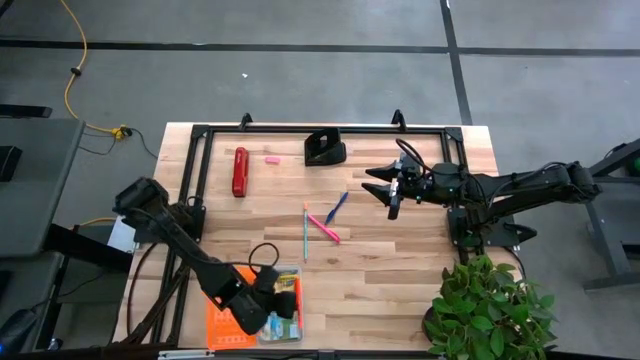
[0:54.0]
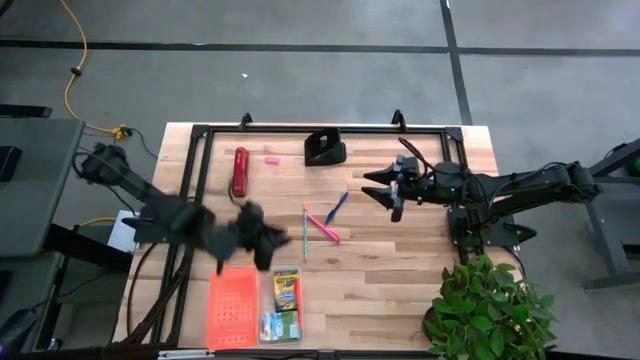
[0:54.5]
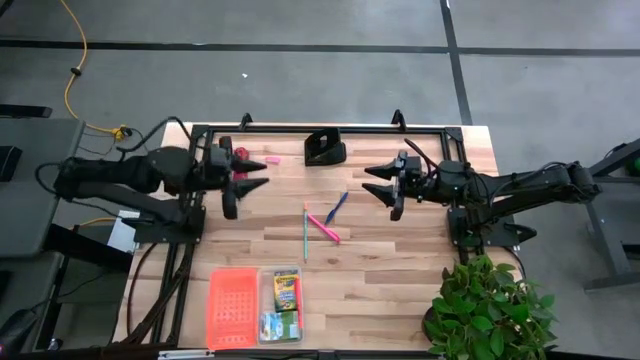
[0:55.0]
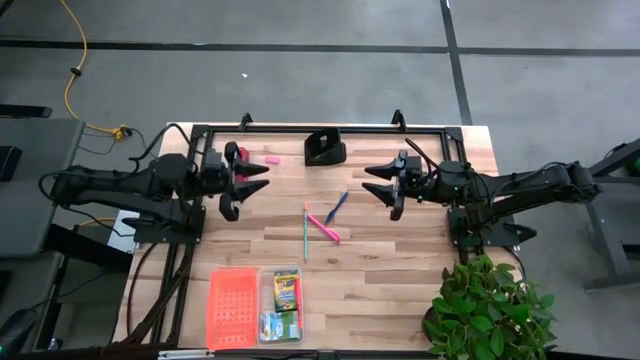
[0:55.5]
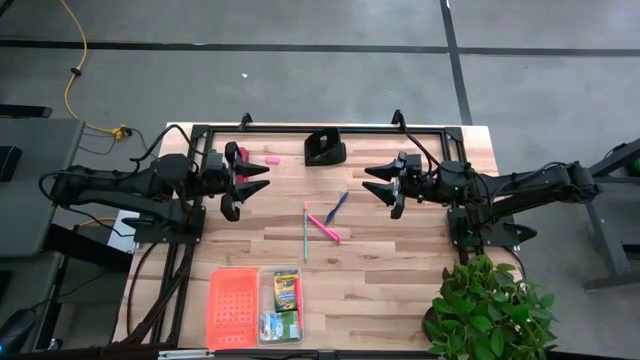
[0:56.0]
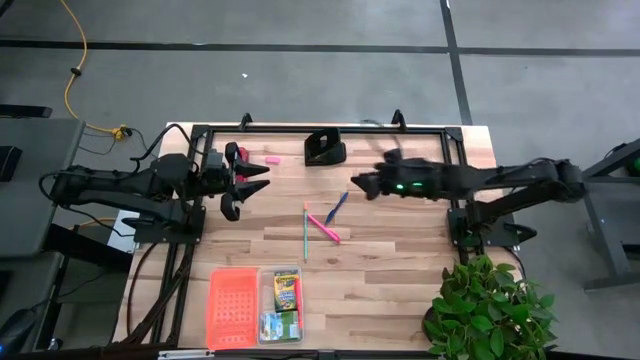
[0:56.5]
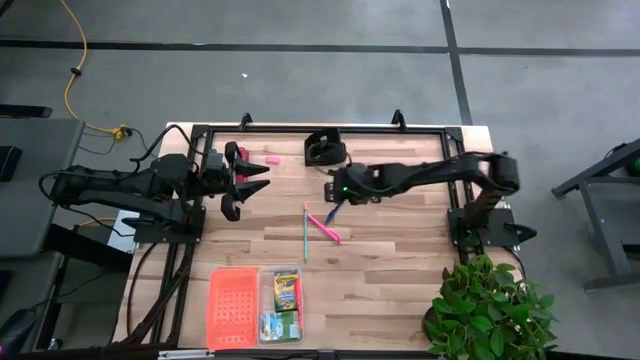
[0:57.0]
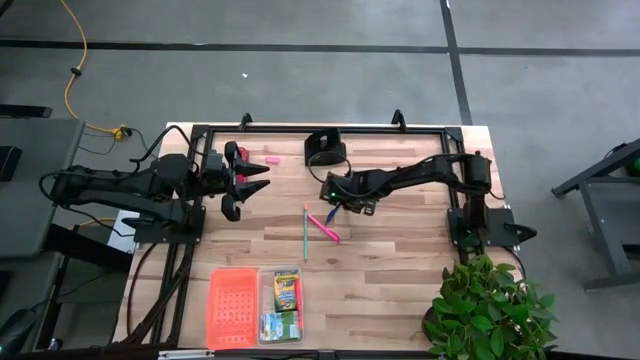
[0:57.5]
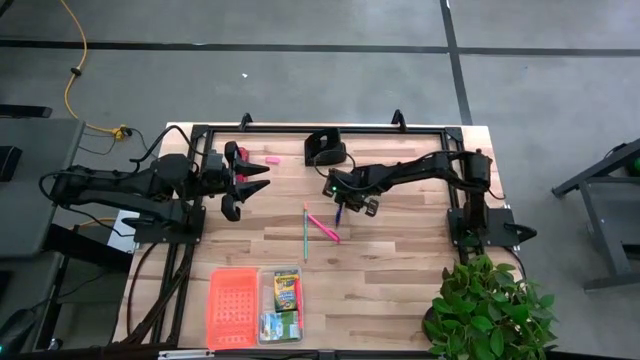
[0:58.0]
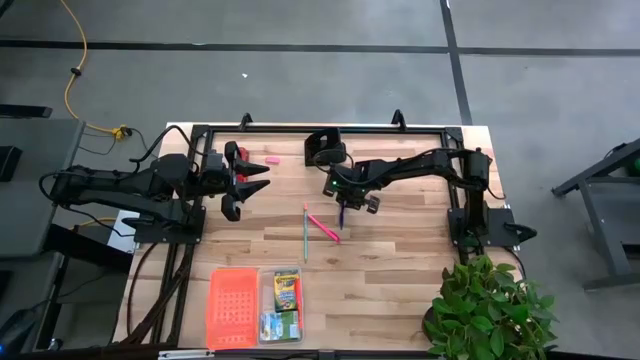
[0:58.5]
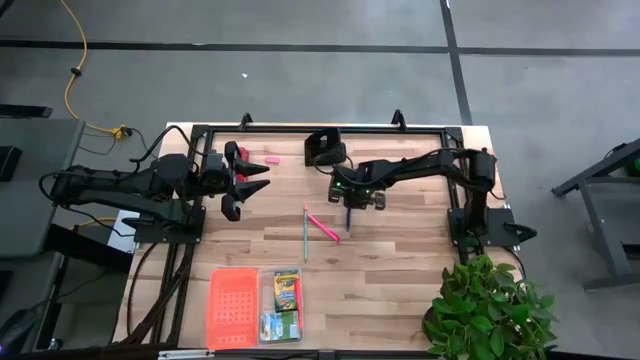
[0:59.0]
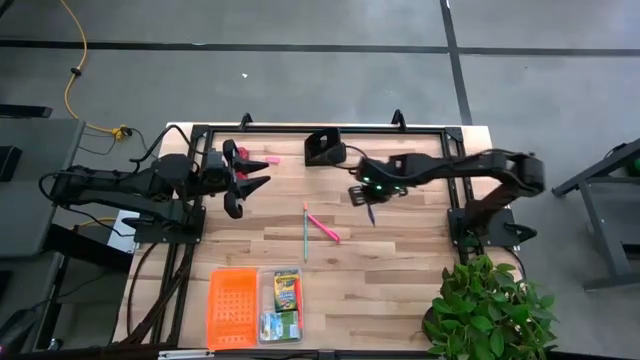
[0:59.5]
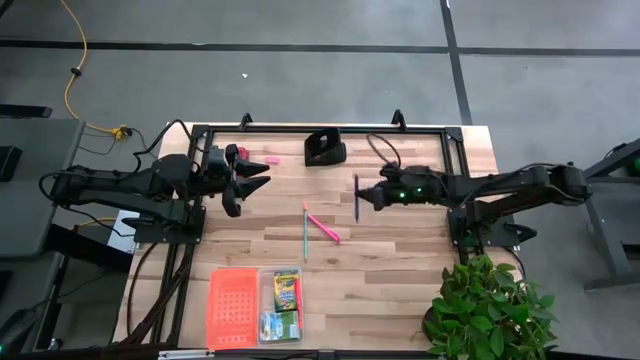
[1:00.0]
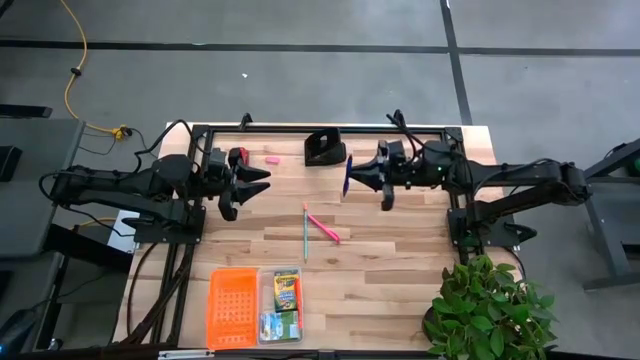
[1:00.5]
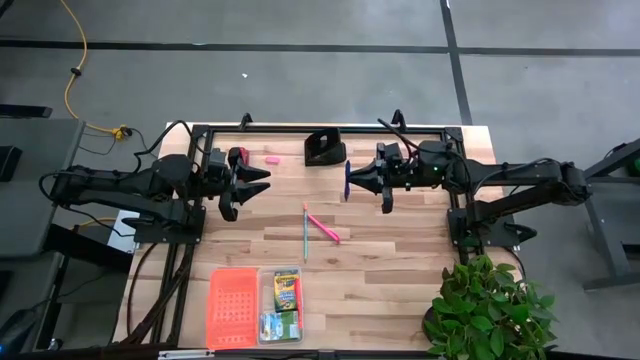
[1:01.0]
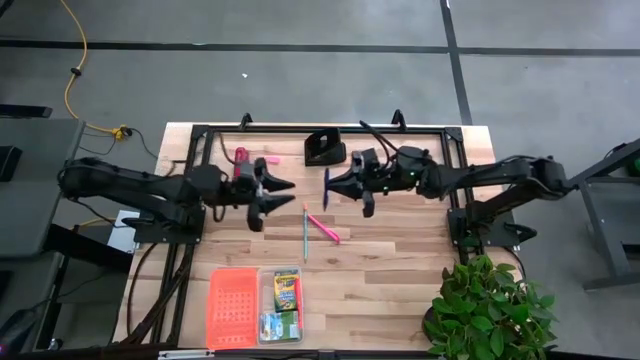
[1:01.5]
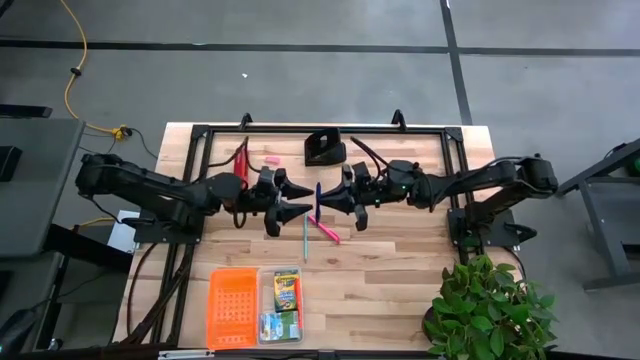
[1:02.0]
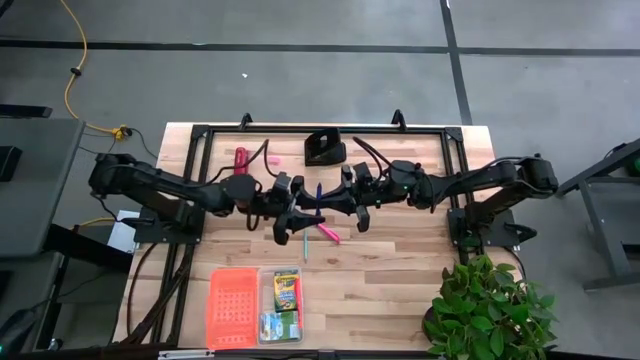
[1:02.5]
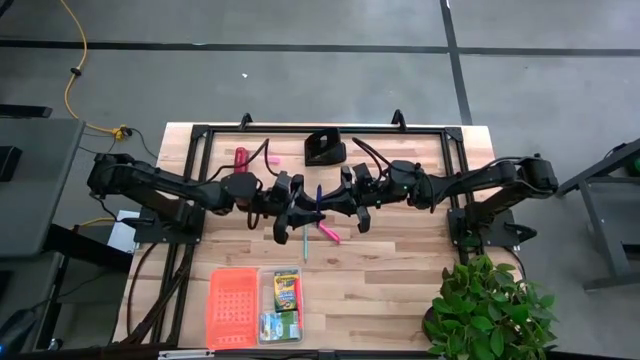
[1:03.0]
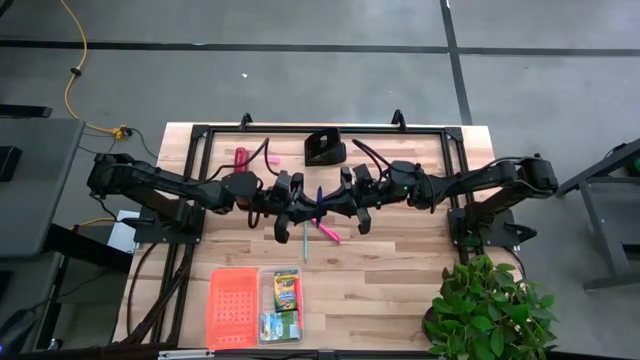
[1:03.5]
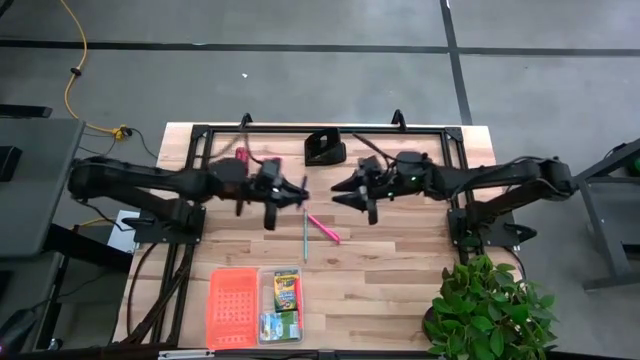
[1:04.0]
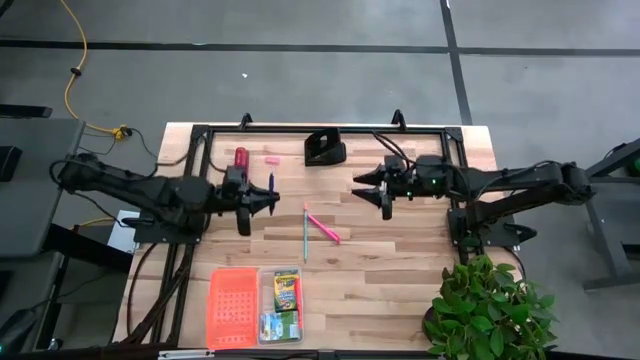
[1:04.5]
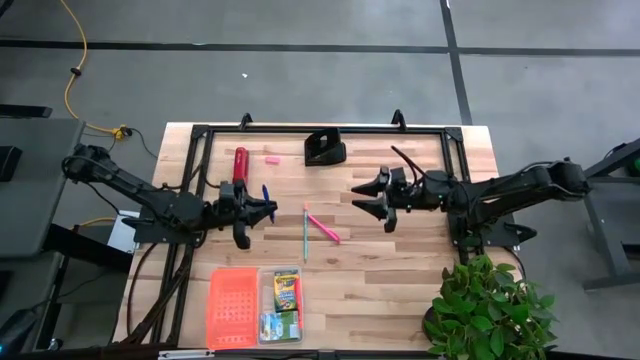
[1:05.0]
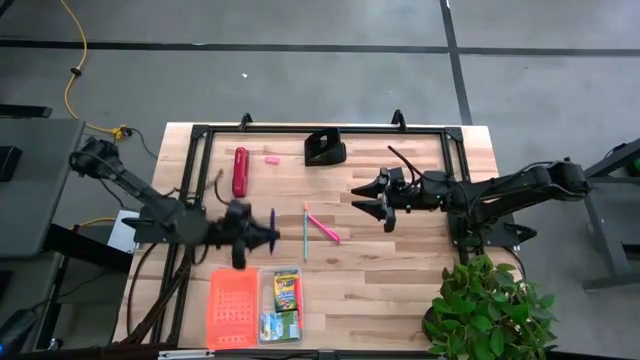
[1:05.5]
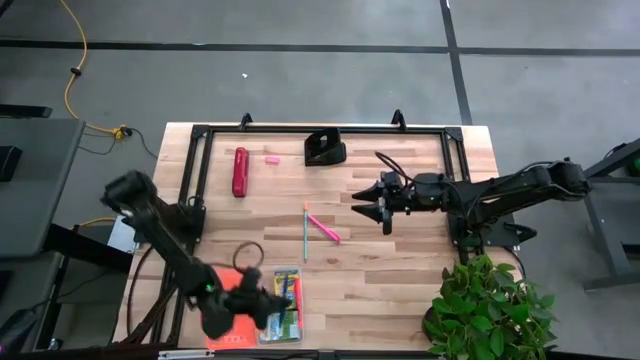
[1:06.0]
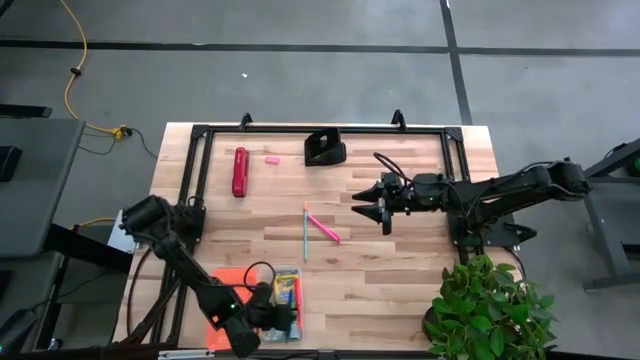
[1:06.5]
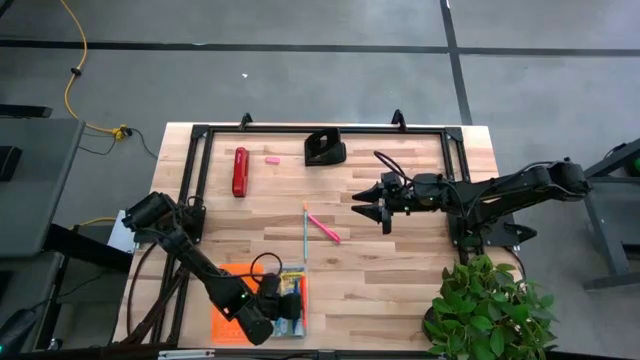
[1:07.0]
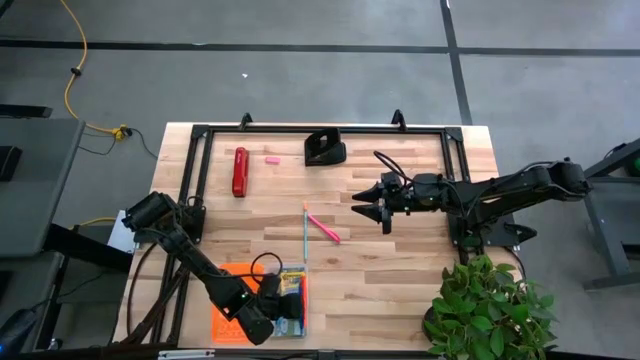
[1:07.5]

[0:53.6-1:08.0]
Task: Pack school essentials
Put the blue pen into the supply box

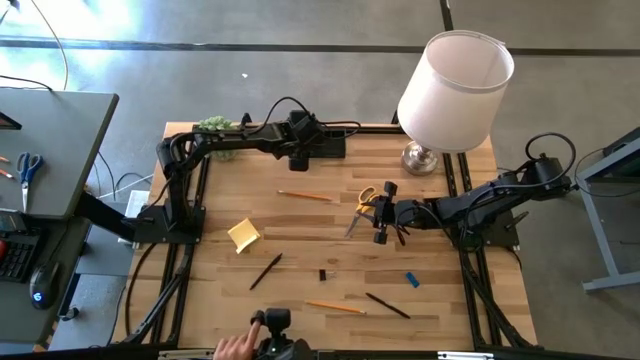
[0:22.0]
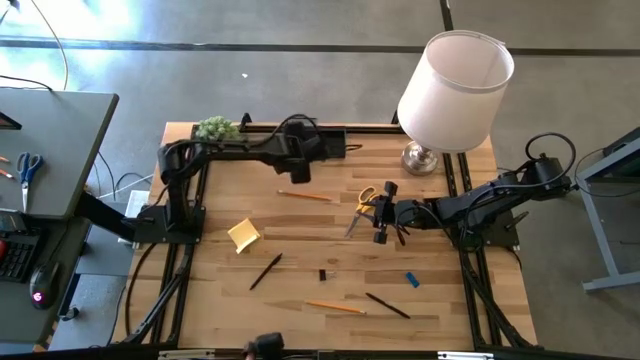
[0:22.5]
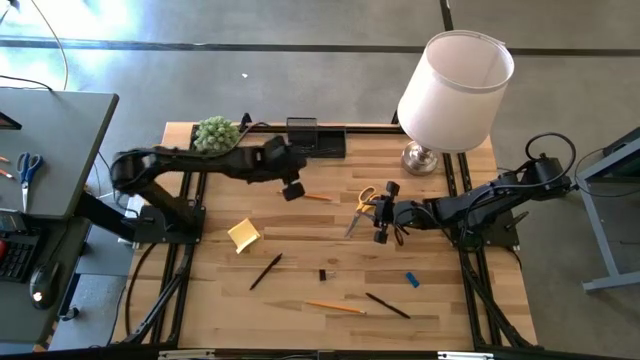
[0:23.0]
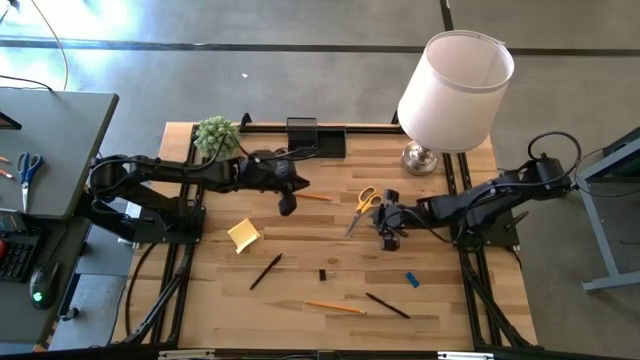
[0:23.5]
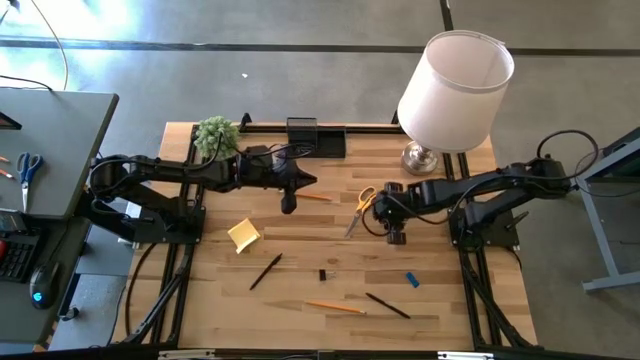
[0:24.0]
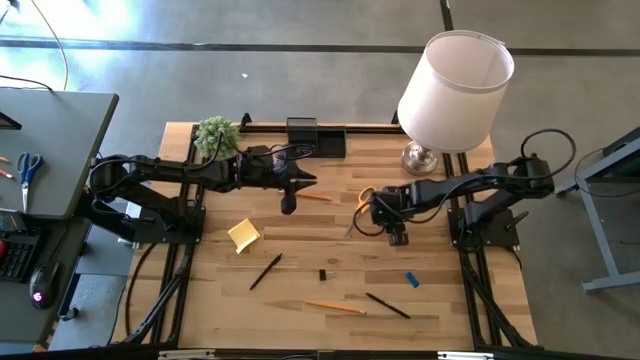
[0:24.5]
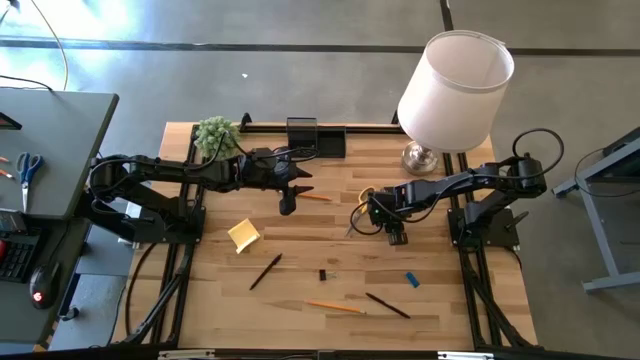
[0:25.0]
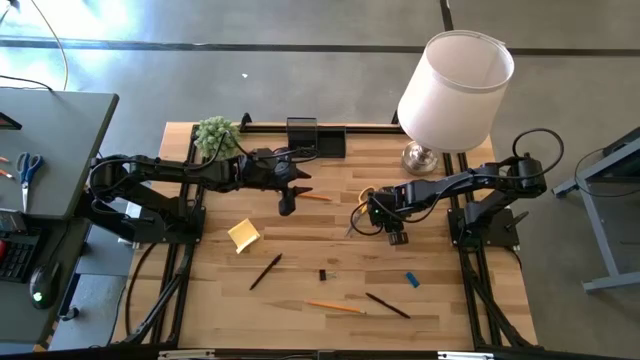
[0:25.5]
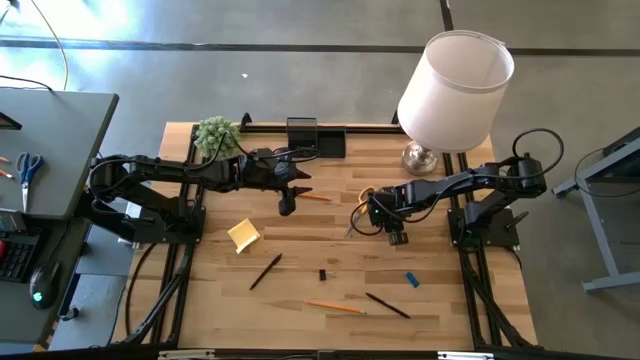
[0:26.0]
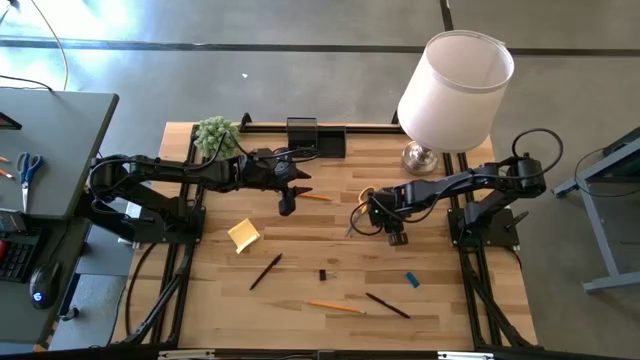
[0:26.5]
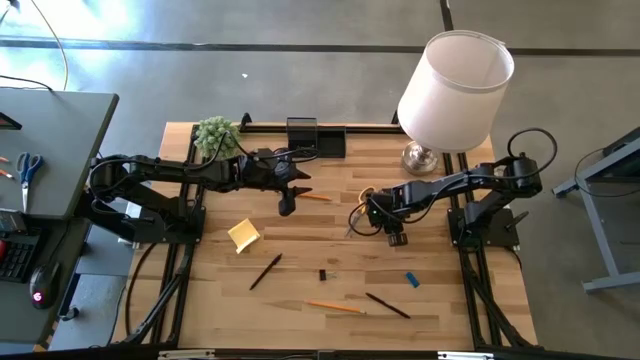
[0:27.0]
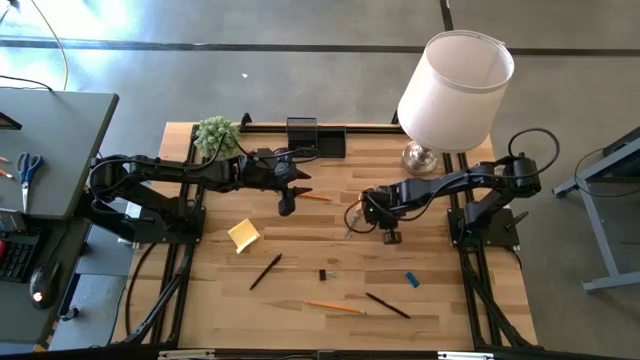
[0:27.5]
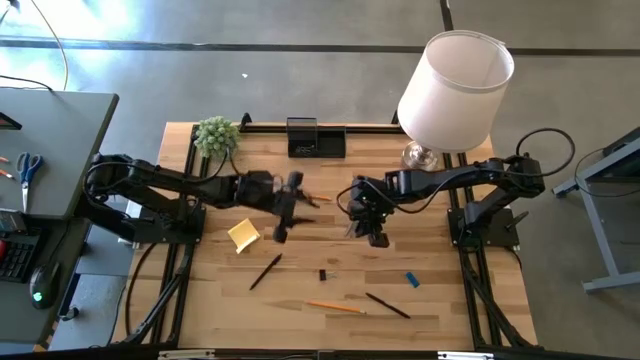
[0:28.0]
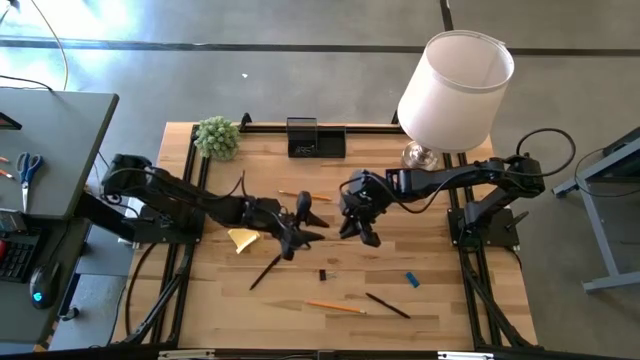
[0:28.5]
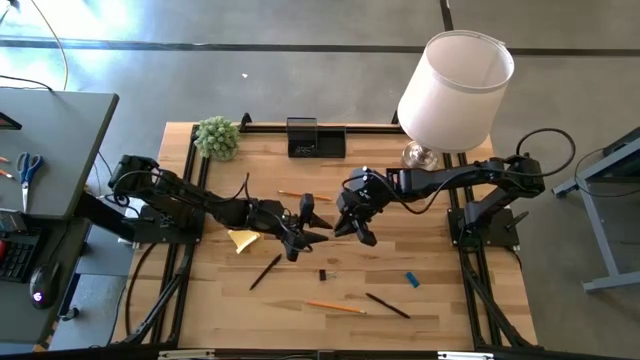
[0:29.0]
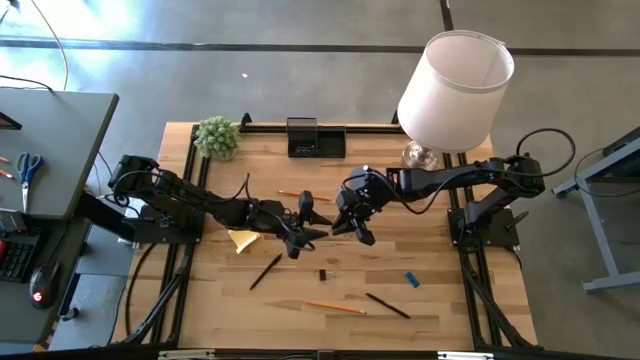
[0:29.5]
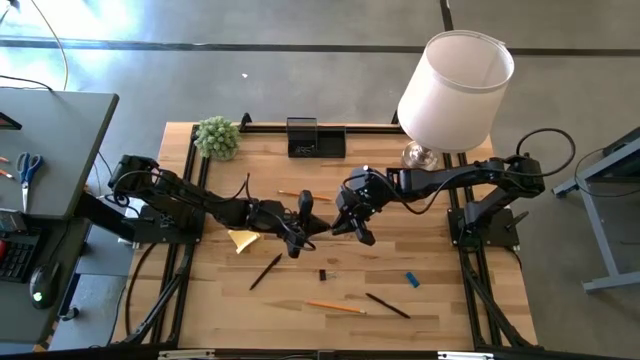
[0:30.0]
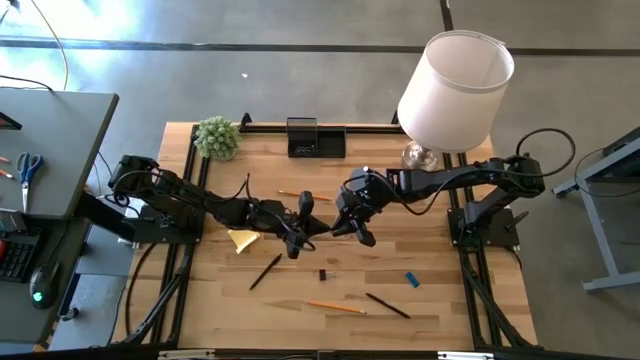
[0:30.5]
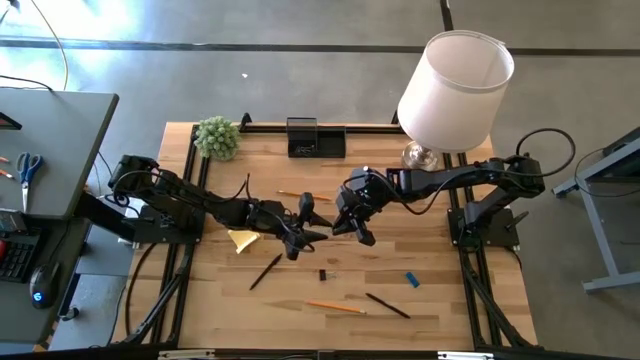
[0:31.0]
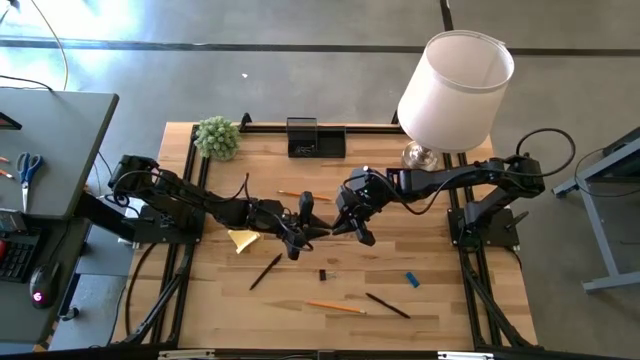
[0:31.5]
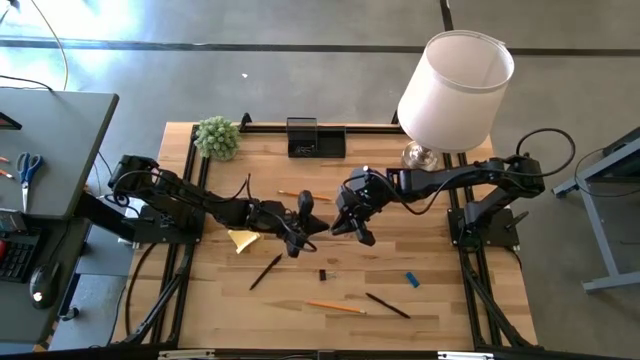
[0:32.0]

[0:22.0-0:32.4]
Task: Pick and place office supplies into organizer
Put the blue binder clip into the bottom left slot of the desk organizer
